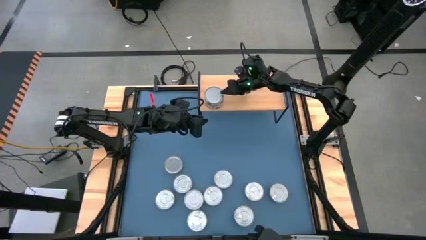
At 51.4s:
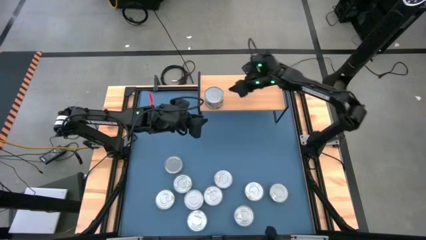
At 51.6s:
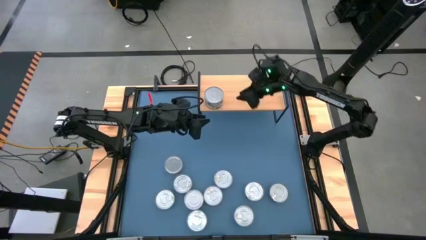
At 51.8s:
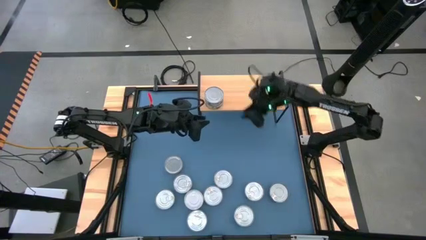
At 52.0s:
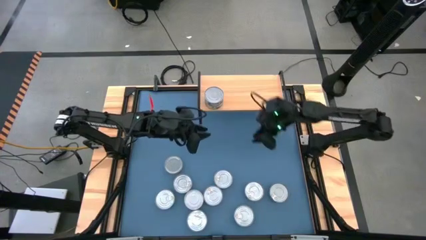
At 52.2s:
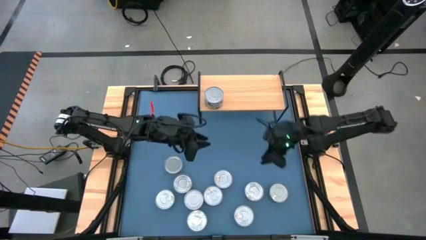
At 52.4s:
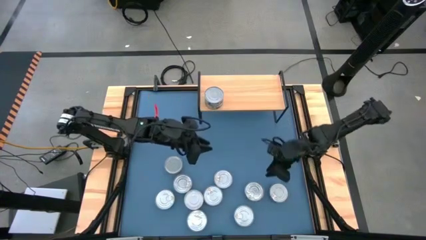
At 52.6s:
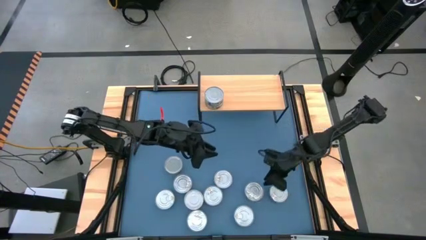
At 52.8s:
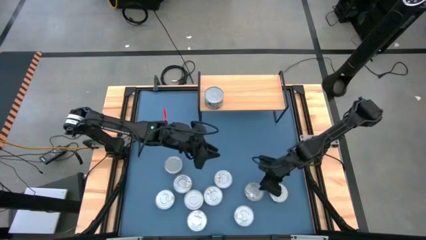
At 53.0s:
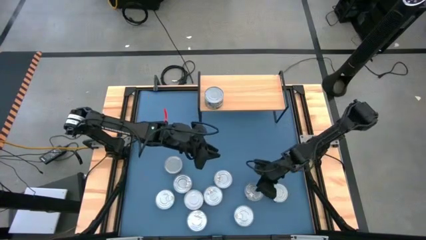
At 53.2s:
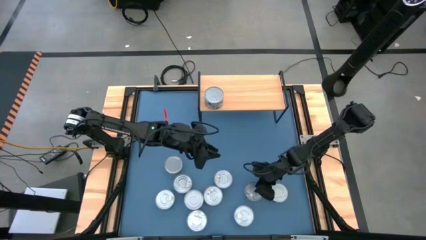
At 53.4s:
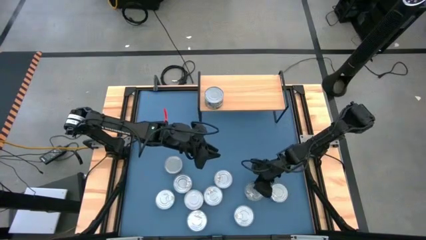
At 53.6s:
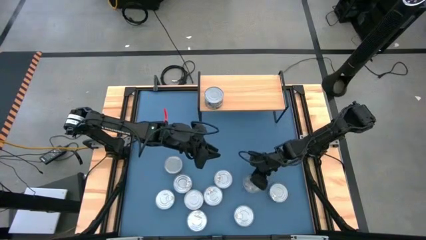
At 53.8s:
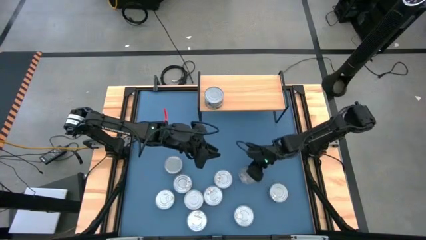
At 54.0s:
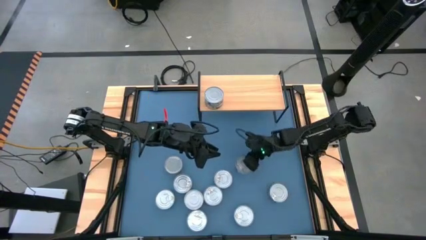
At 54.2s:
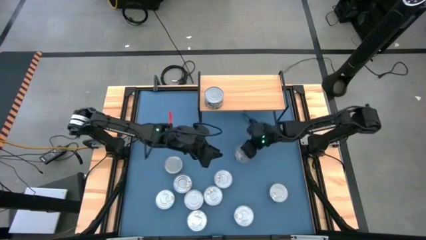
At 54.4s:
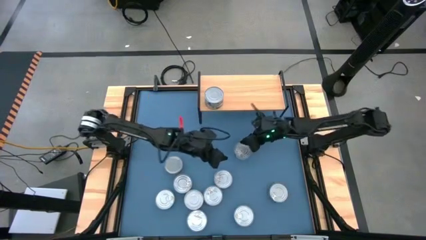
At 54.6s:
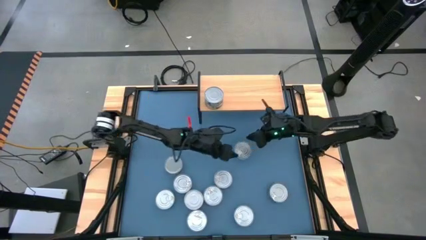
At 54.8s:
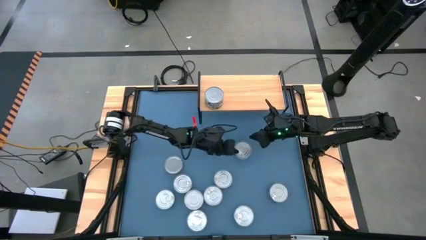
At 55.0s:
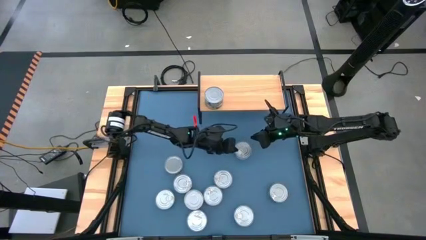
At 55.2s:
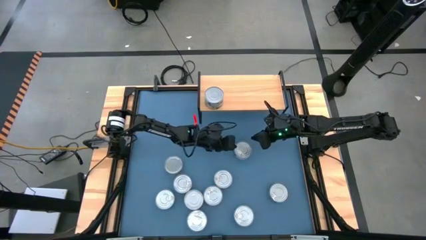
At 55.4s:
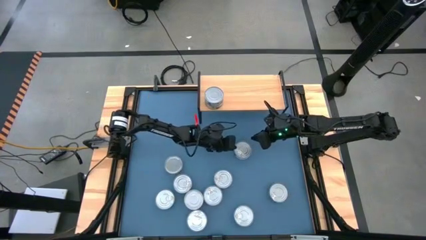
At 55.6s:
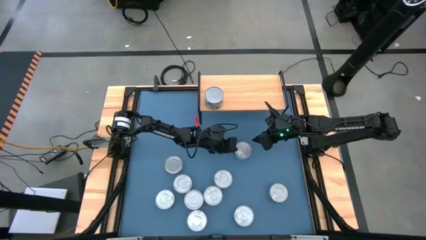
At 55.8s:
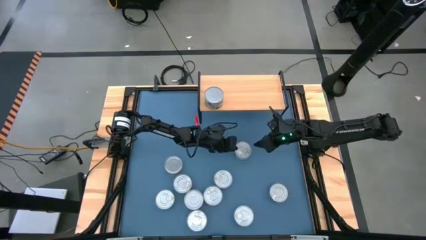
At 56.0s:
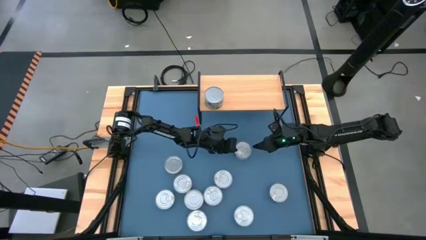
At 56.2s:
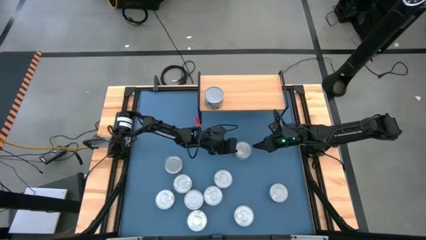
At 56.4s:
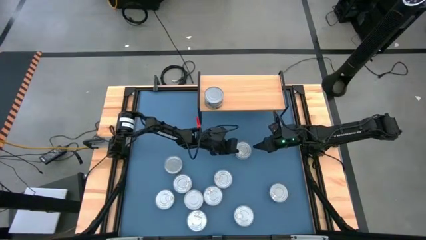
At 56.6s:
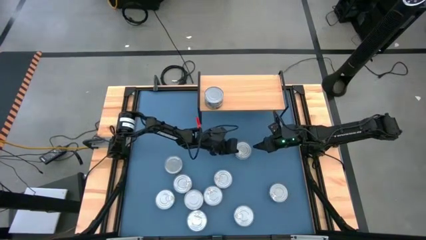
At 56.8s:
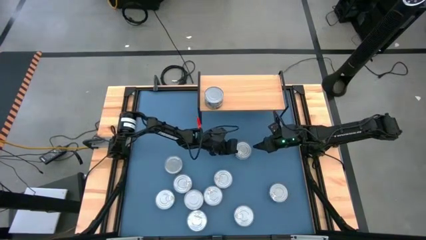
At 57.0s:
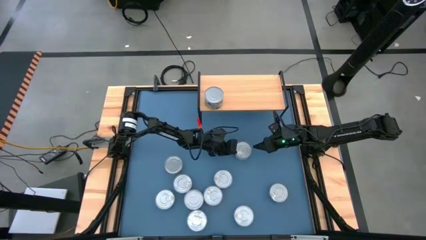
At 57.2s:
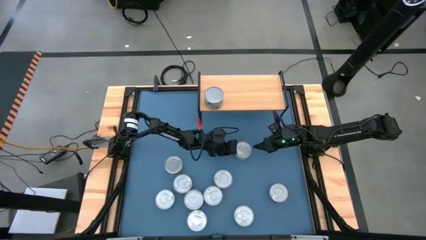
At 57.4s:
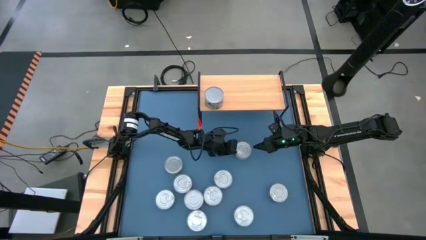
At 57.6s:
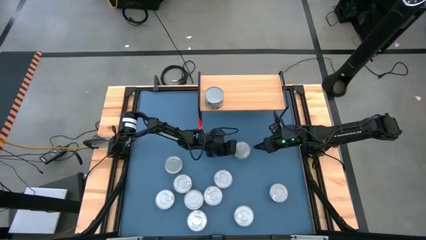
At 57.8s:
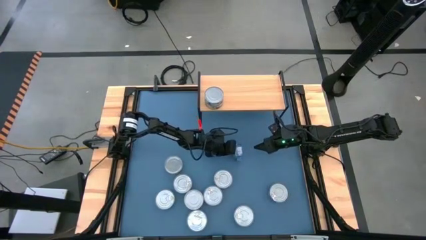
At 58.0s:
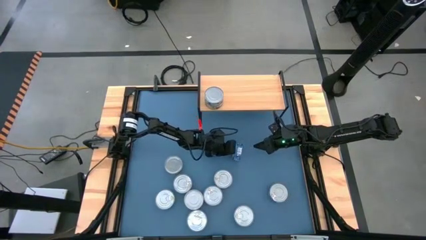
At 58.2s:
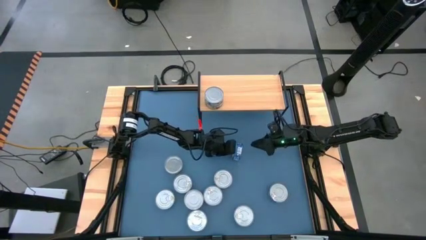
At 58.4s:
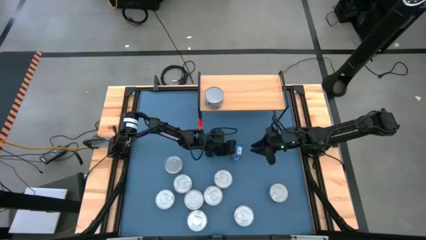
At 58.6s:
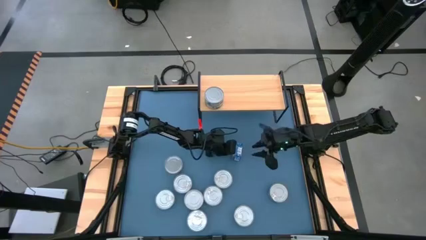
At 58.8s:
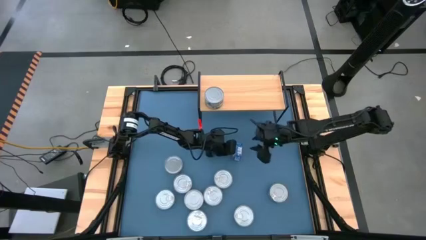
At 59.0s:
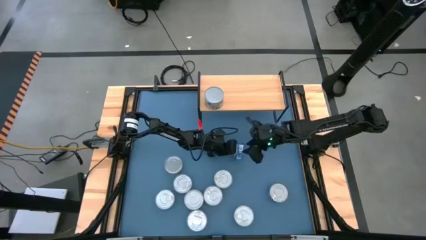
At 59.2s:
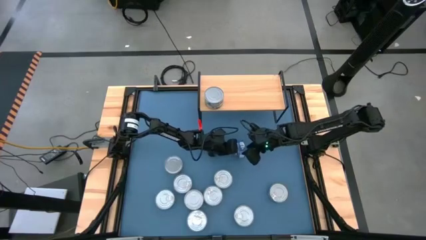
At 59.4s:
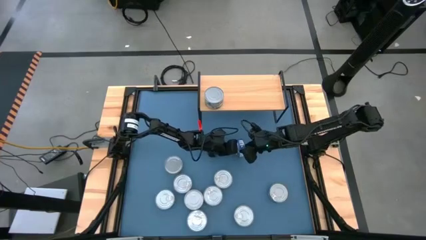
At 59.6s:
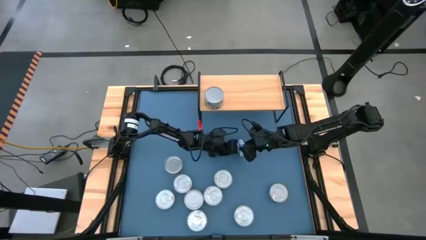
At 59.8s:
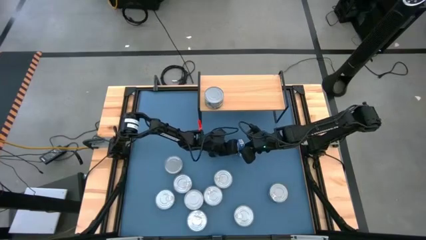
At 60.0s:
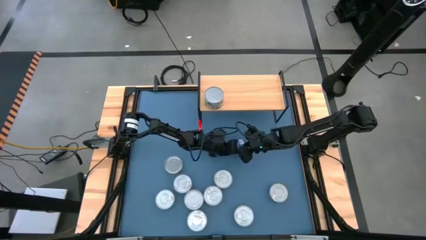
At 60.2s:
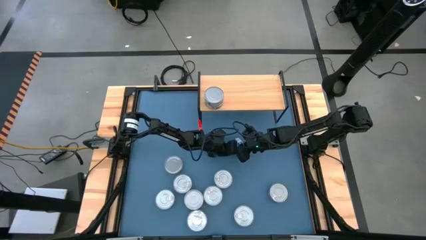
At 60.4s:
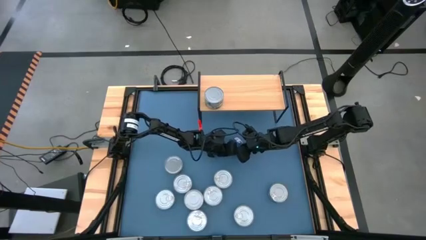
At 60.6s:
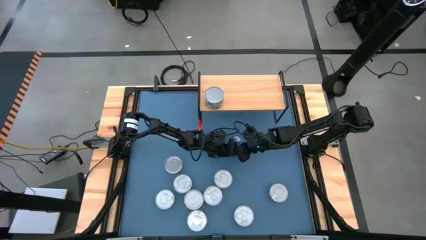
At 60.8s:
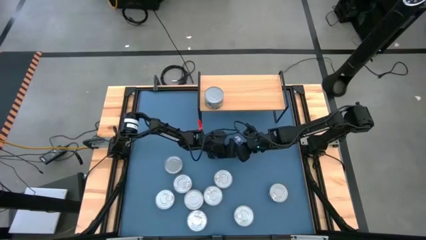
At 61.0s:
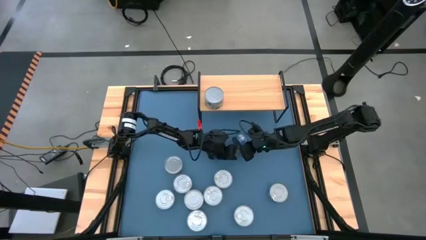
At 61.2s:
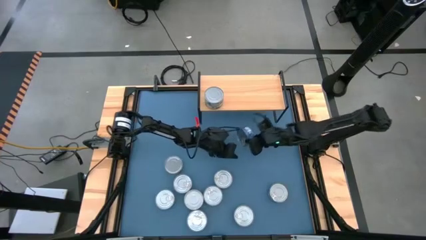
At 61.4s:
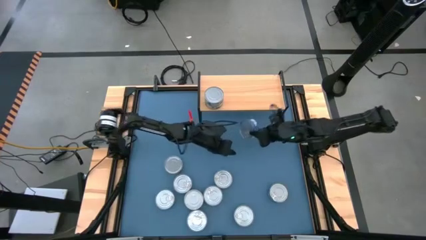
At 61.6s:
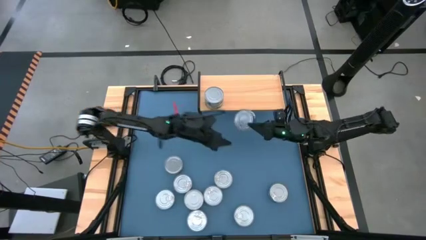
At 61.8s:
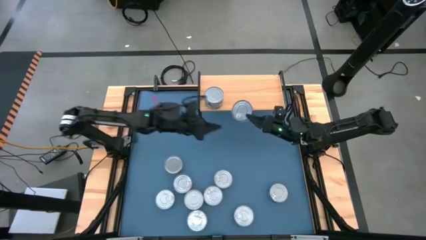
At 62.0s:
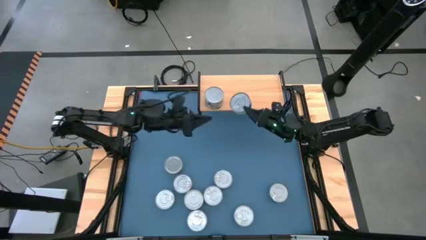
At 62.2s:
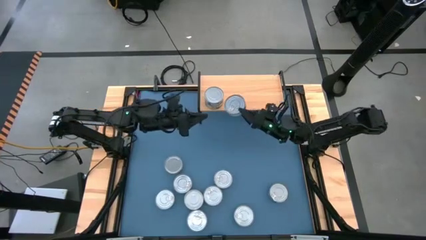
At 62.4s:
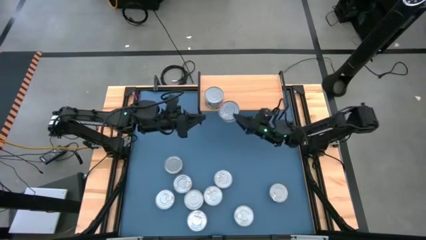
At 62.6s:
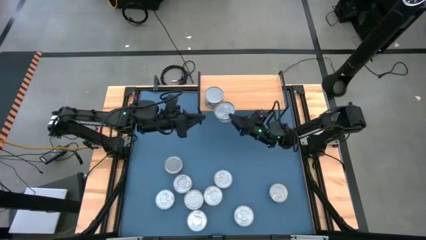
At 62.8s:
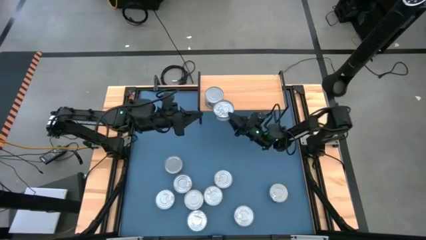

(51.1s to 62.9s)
Task: Stack canned seafood by type on shelf
Put the blue tuna can on the shelf

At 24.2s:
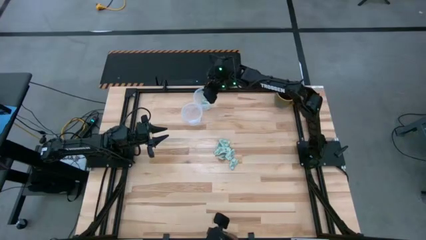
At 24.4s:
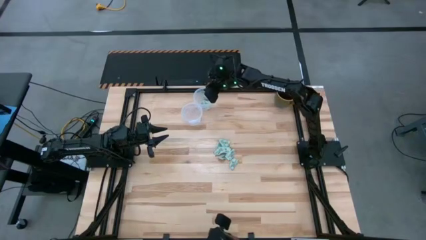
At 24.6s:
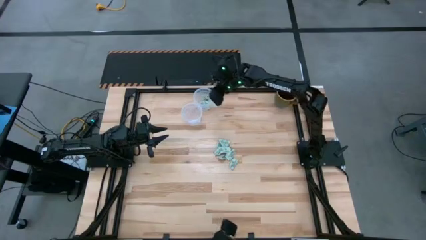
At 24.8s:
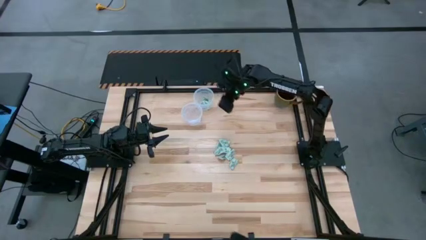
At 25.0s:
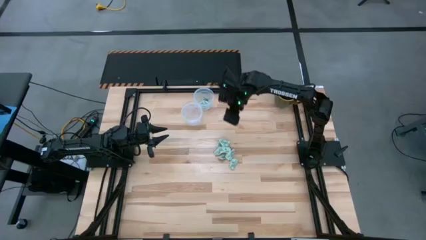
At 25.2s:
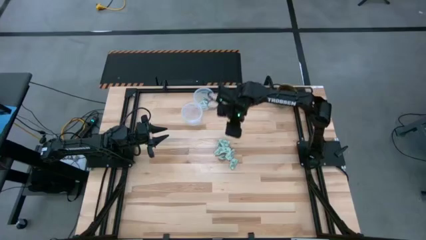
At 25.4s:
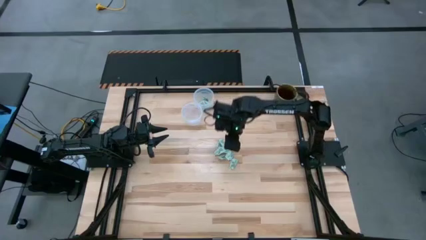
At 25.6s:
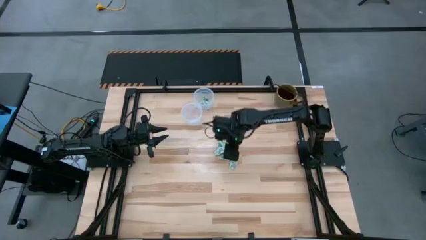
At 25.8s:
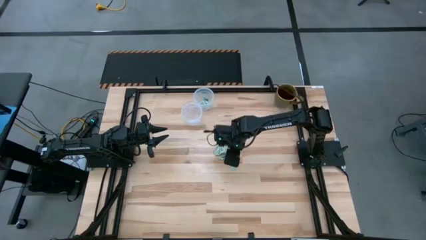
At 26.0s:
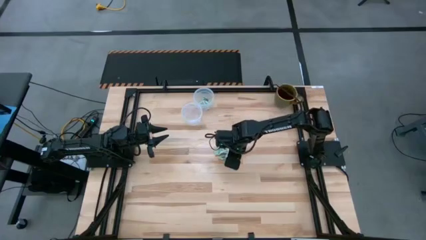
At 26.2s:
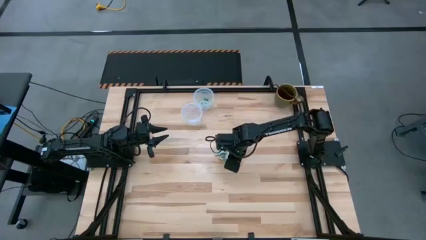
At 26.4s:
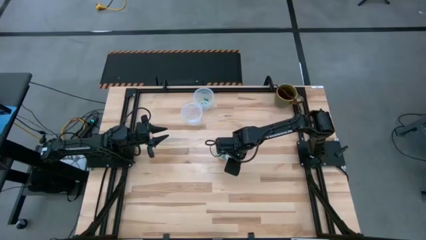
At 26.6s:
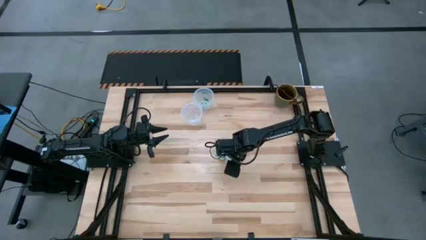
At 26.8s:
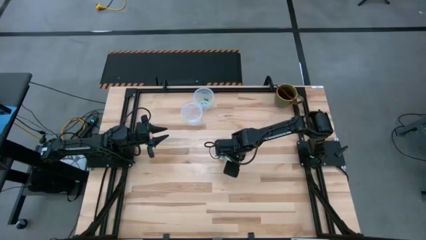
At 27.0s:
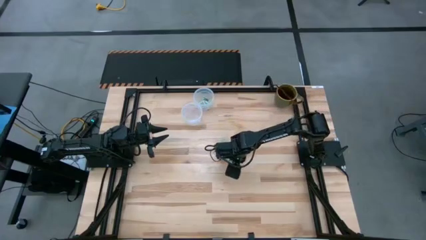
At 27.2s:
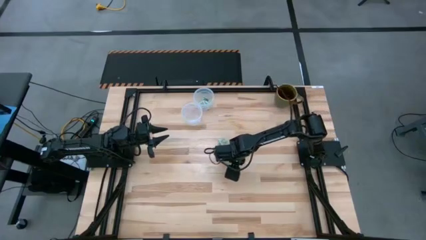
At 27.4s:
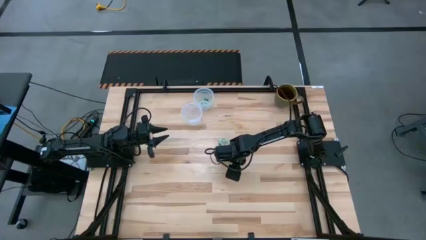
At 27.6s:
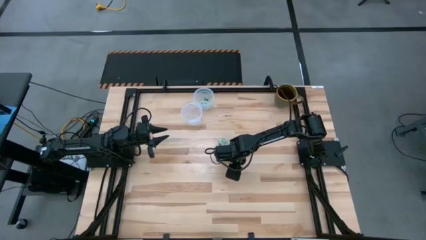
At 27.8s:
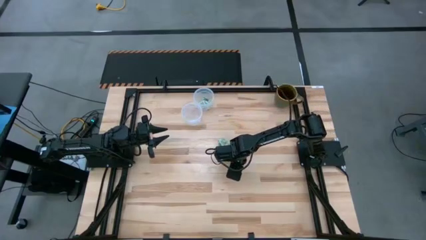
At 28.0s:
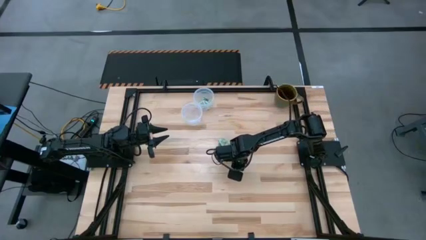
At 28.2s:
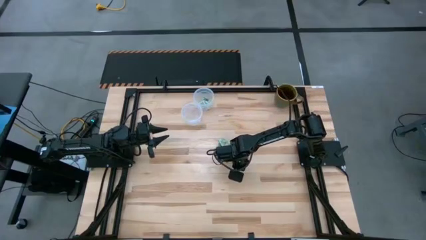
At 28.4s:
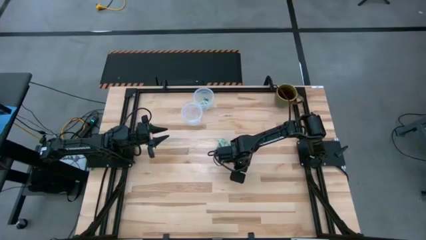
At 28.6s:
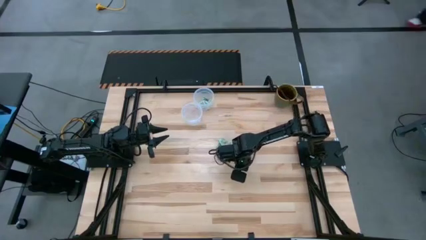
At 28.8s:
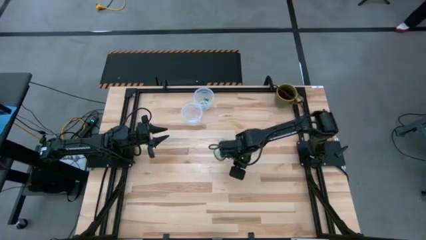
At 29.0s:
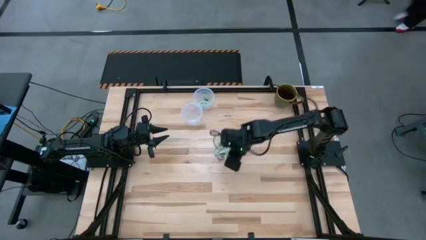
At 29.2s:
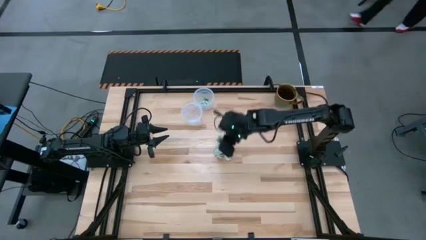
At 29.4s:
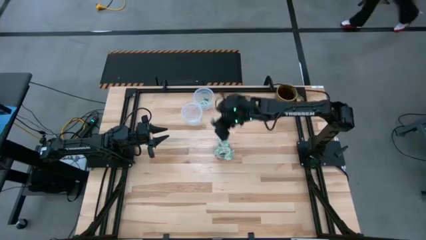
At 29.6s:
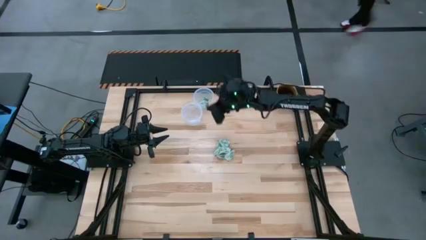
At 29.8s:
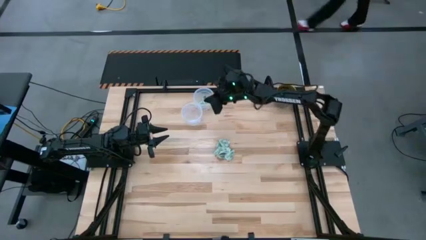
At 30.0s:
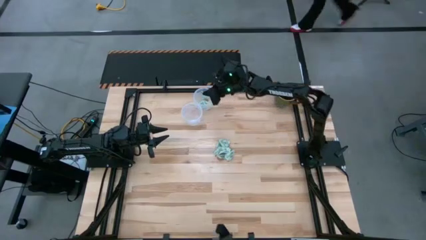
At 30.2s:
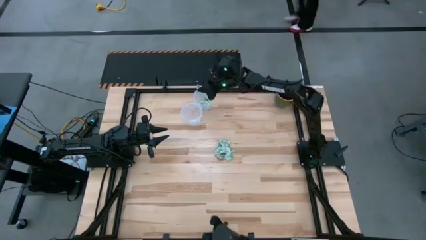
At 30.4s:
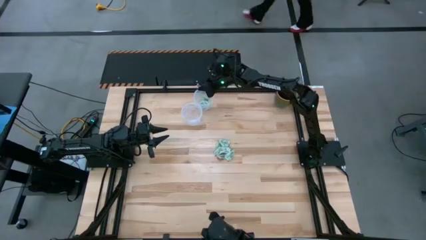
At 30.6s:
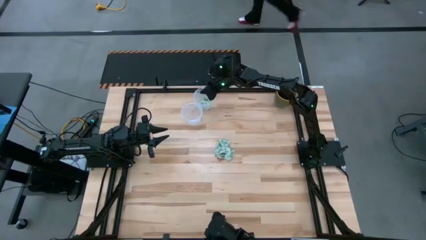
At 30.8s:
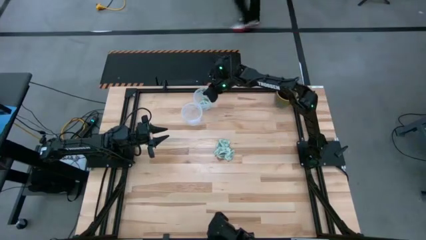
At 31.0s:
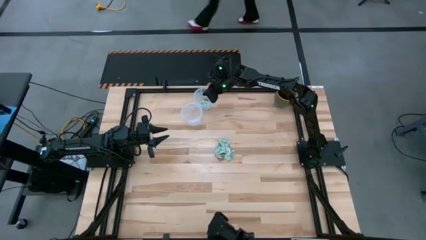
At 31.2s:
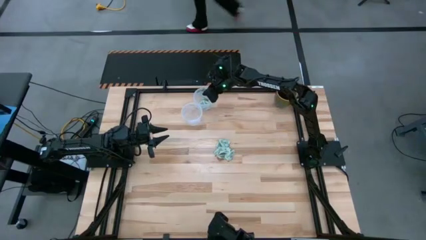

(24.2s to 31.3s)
Task: Pick and place items into bin
Put the stevia packet into the top bin
